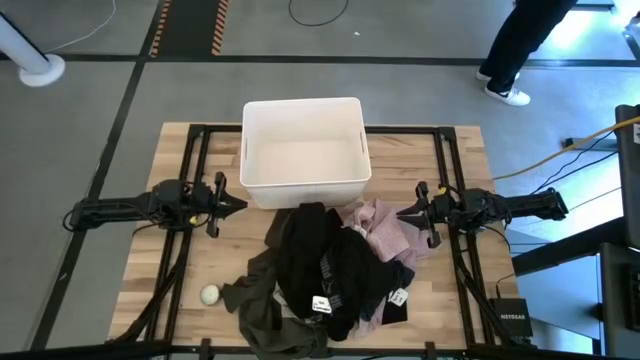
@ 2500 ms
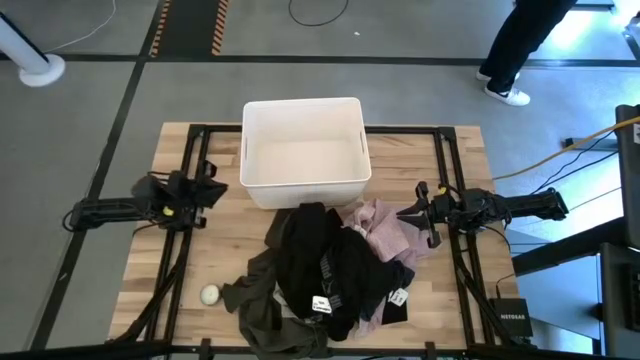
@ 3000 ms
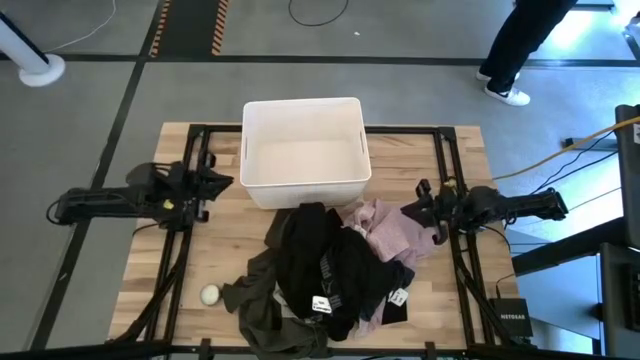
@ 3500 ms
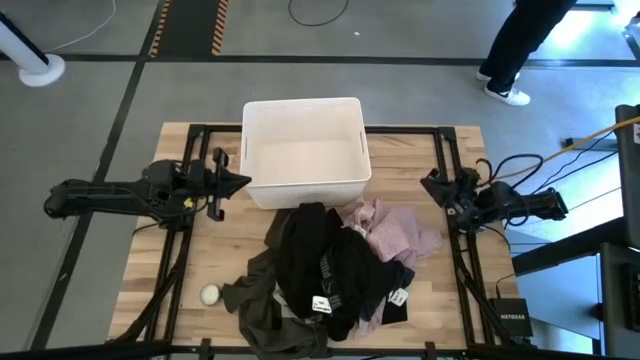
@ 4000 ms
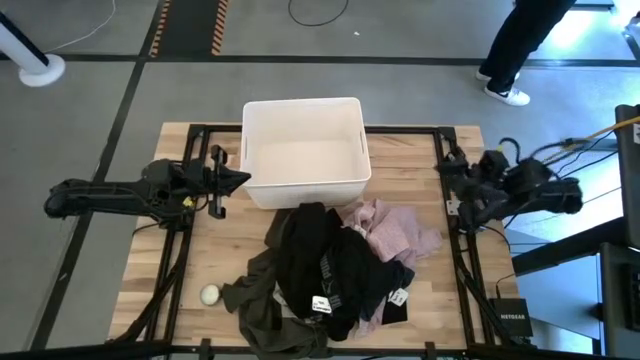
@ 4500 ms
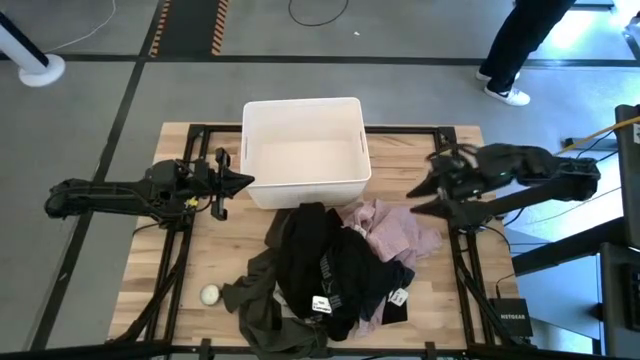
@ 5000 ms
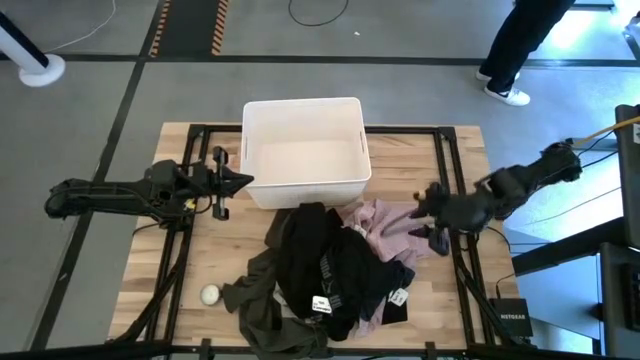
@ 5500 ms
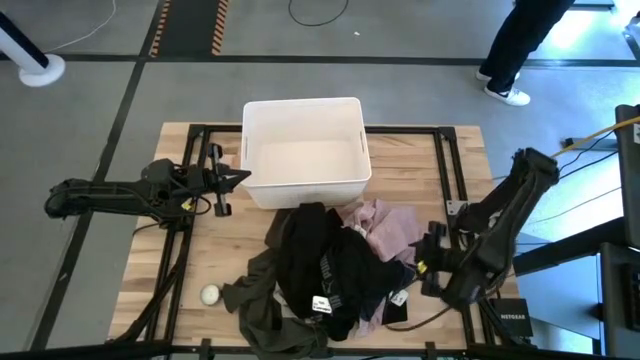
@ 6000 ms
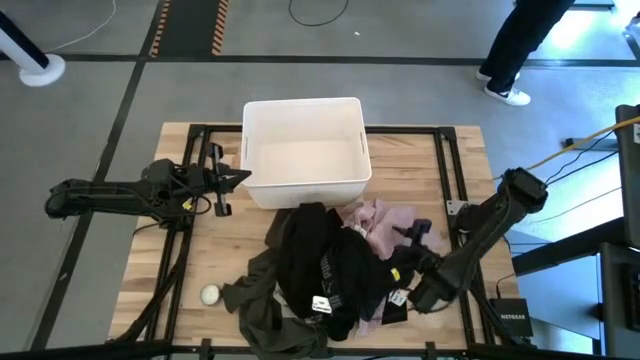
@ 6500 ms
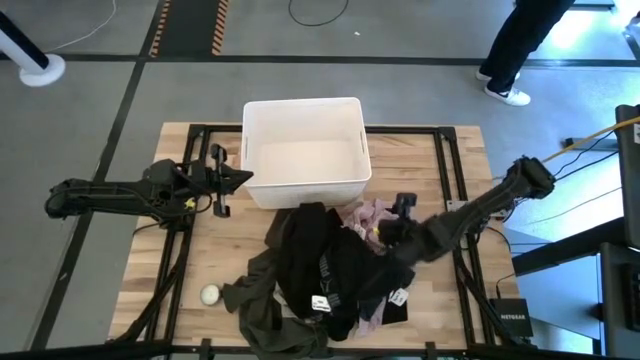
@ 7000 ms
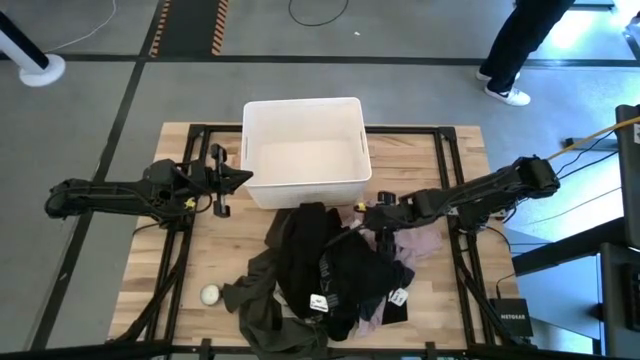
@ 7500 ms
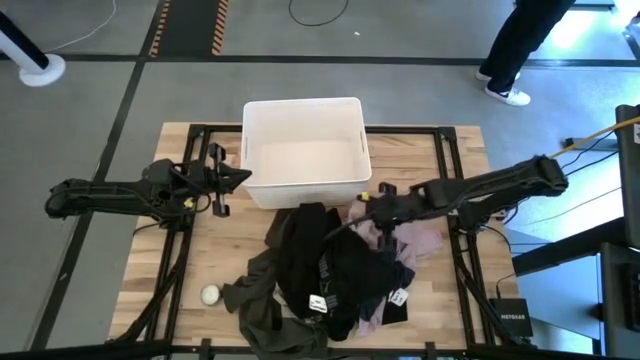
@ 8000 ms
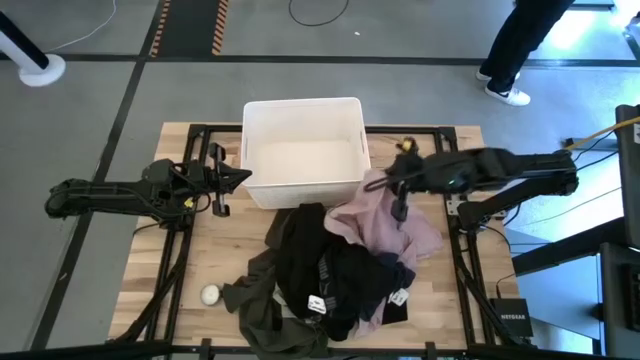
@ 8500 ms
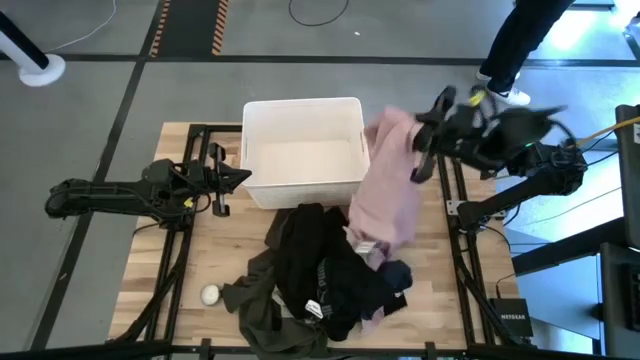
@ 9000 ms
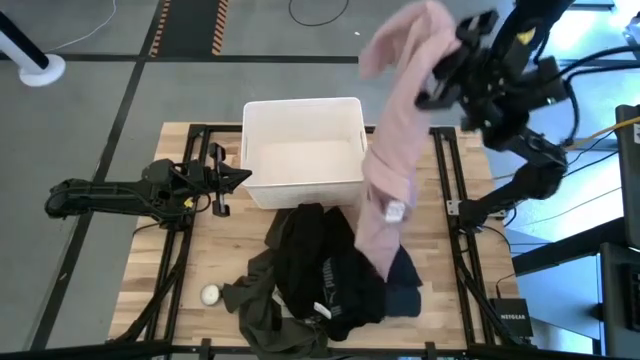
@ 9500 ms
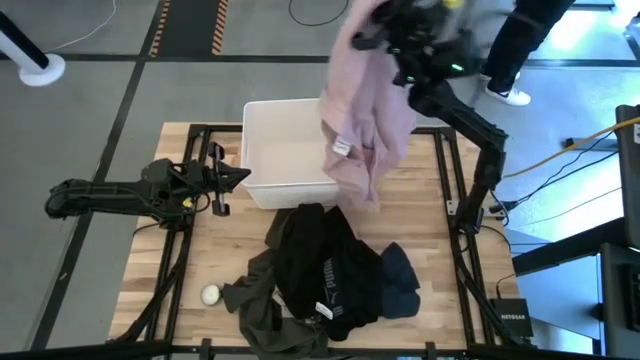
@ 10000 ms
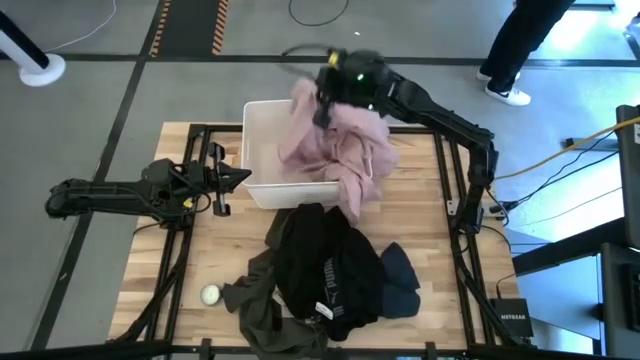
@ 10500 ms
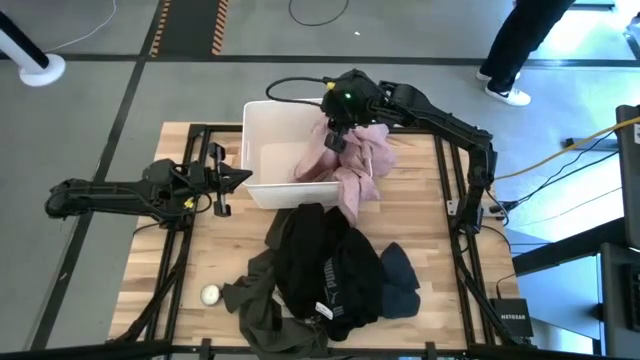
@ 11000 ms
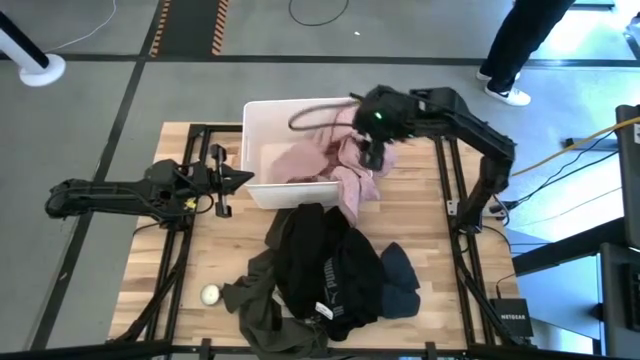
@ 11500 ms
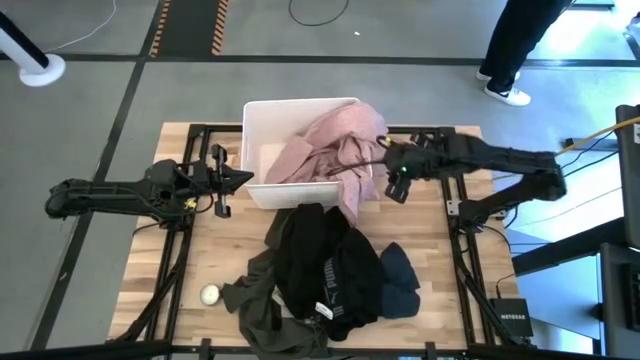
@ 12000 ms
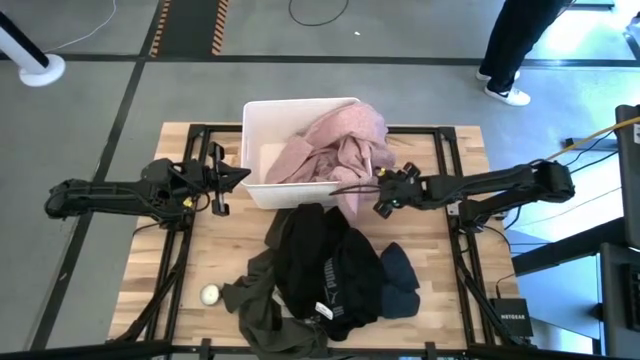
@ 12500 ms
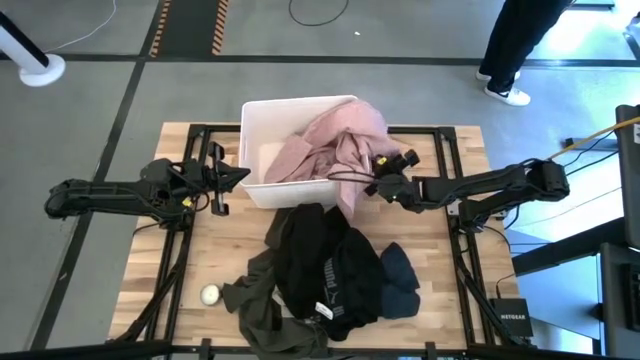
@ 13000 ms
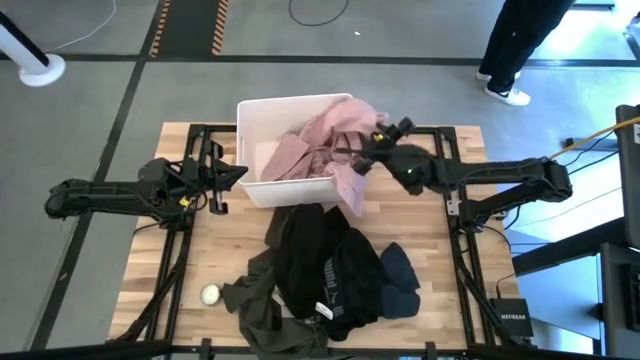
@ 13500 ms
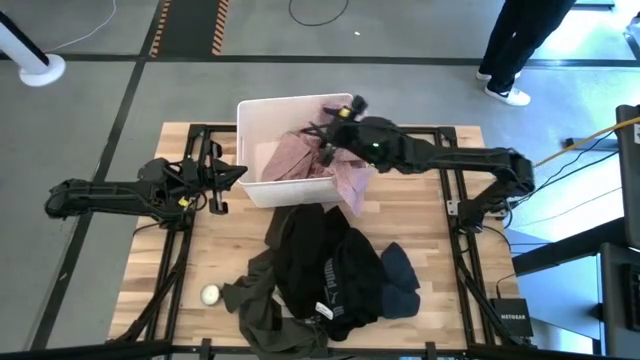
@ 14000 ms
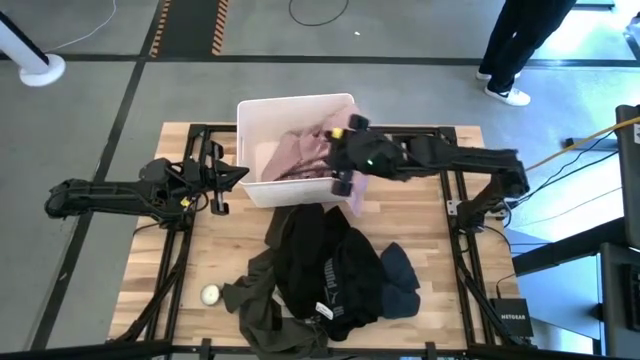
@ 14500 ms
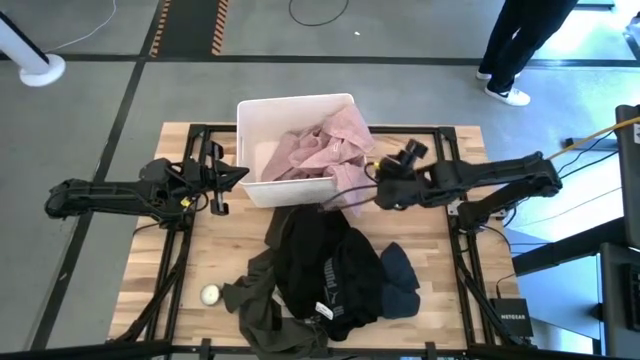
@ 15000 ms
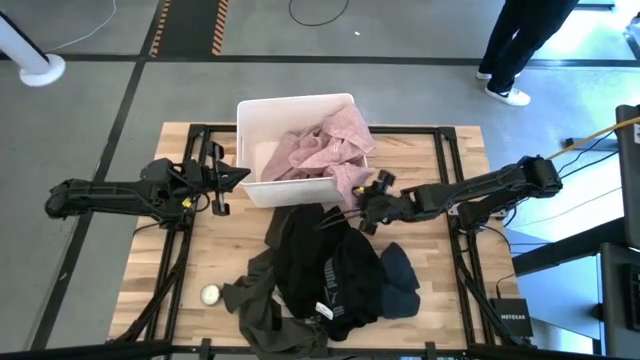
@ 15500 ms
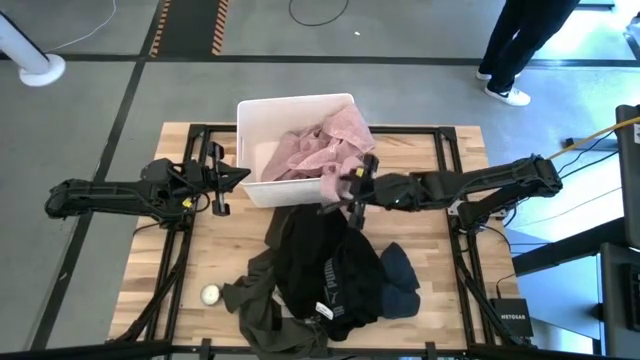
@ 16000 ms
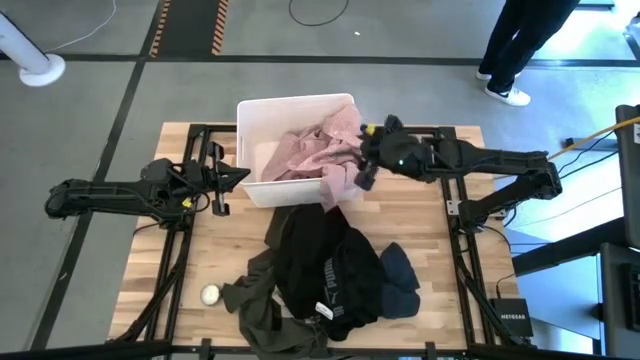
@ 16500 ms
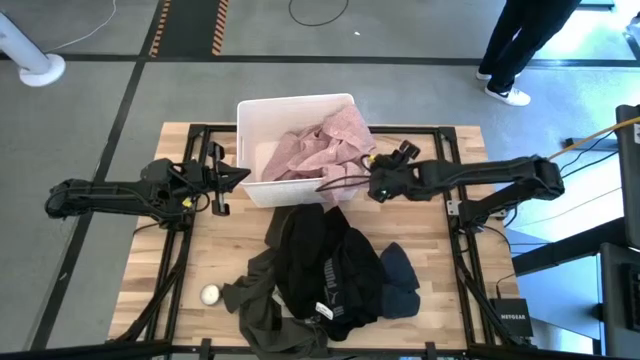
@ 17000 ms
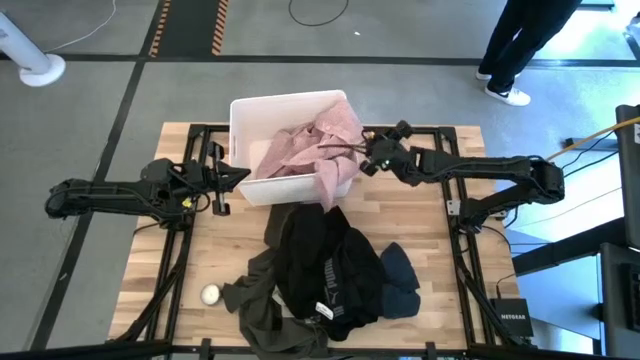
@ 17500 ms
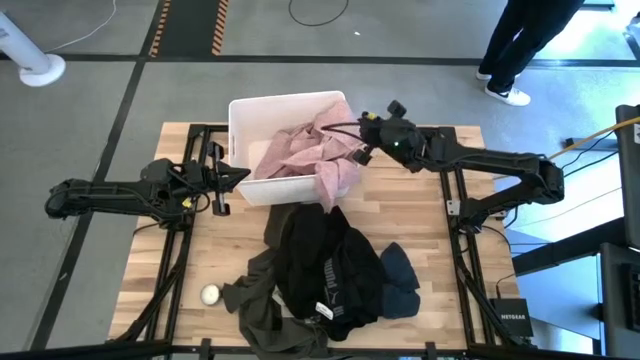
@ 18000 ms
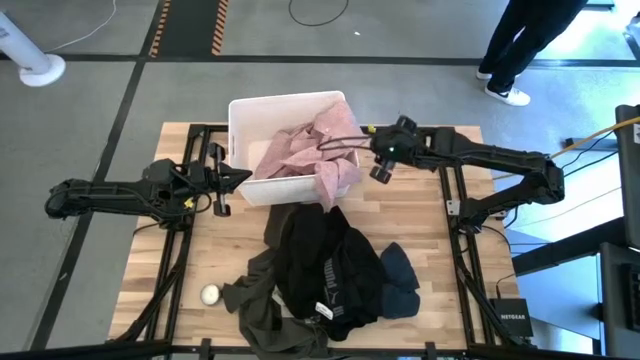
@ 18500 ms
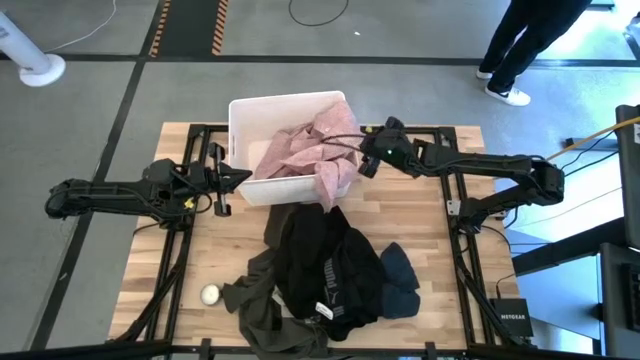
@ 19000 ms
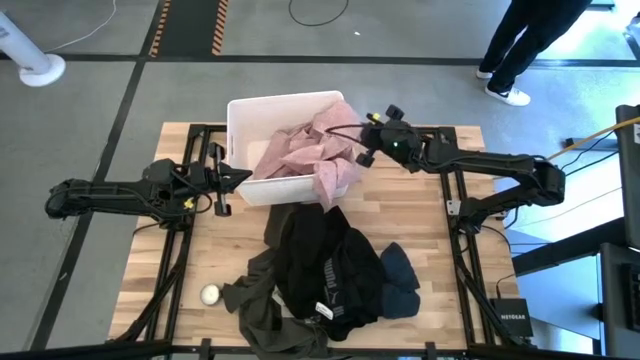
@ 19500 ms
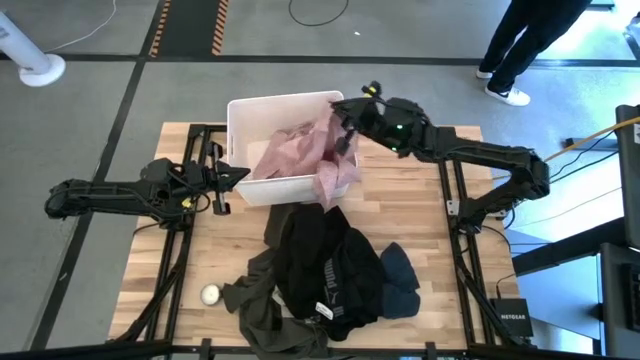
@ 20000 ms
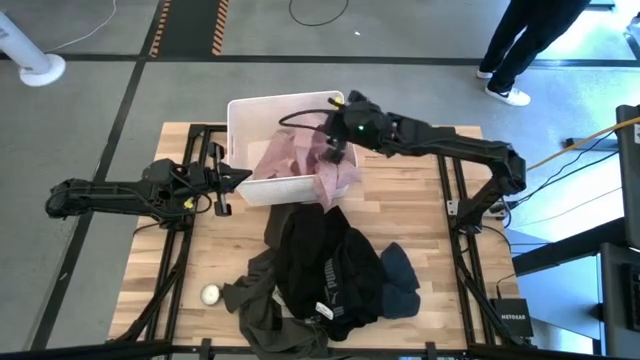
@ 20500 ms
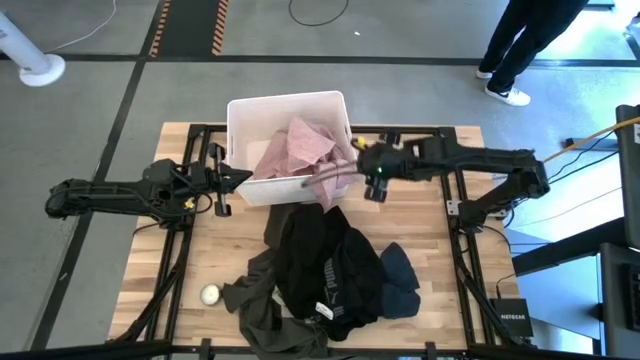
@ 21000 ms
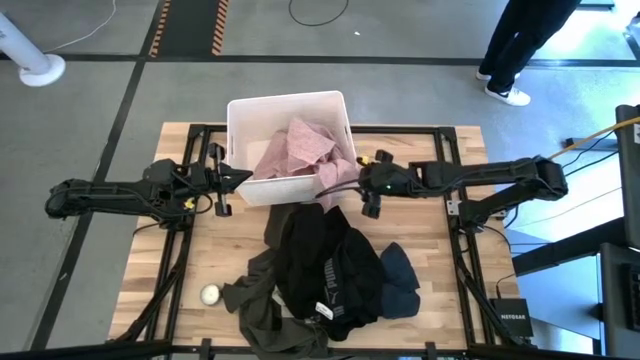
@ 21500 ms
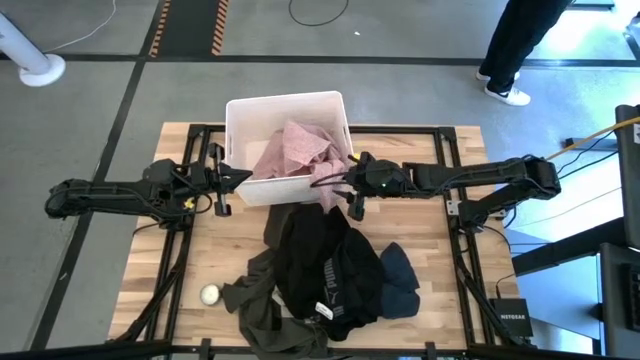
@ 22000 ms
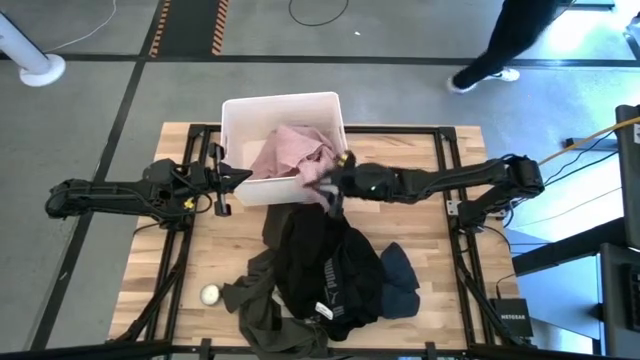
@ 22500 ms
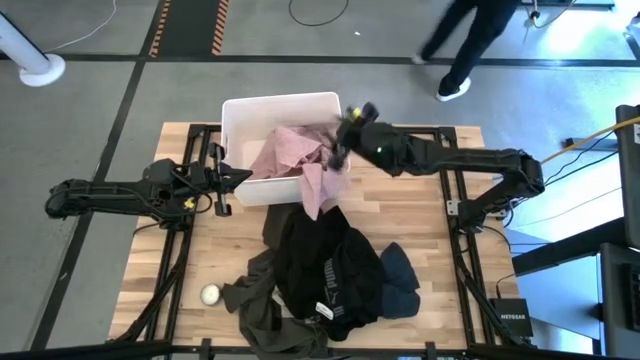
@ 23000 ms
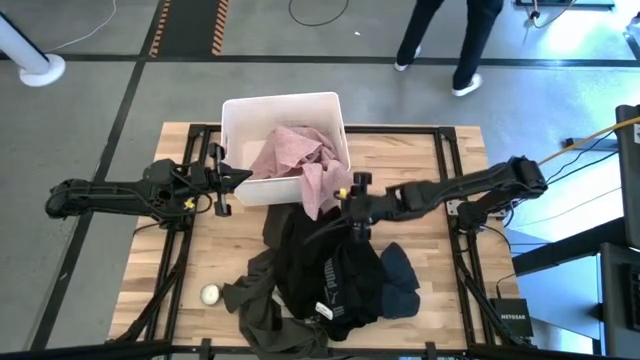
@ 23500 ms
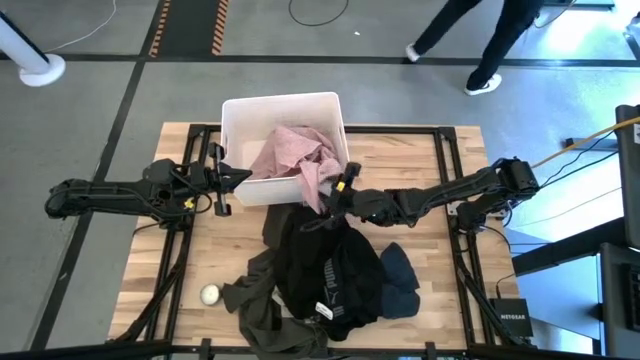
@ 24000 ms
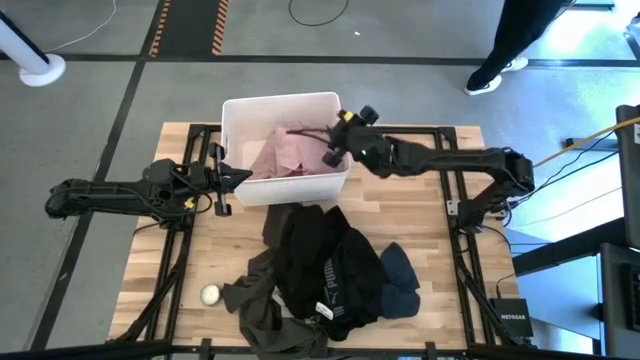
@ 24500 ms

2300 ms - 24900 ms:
Task: Sort clothes
Put the pink polo shirt into the white laundry organizer
